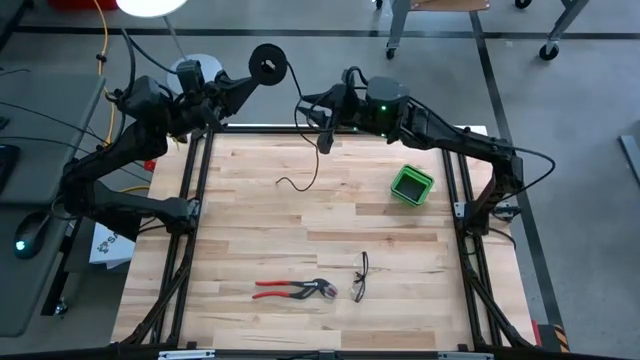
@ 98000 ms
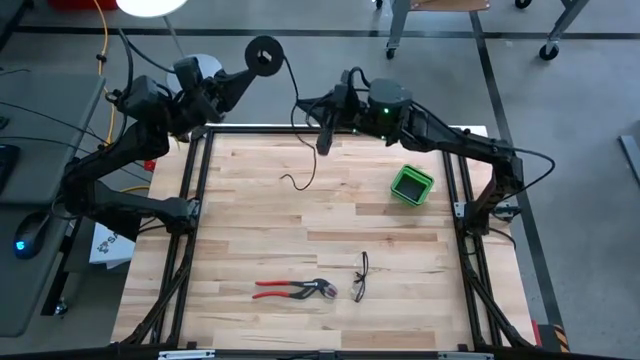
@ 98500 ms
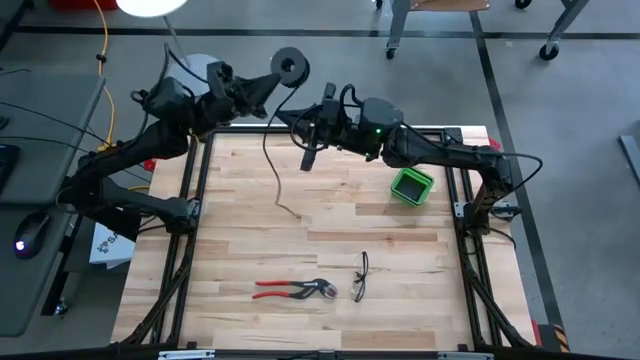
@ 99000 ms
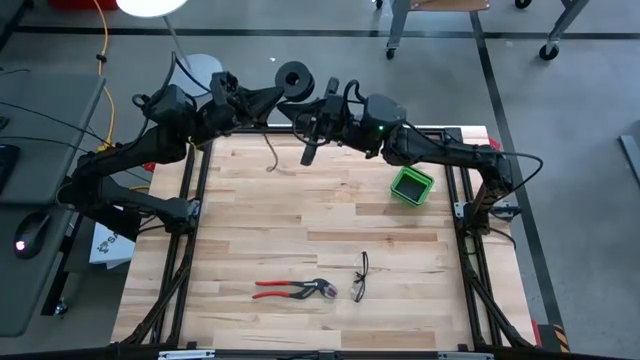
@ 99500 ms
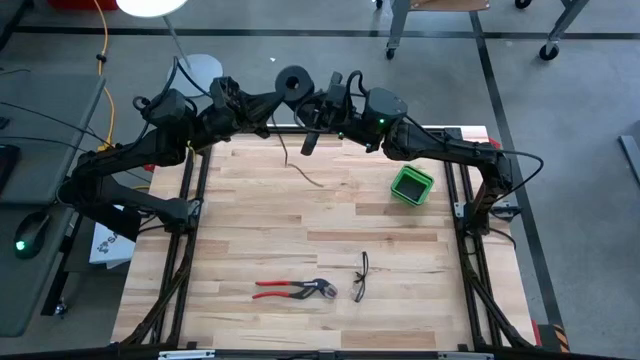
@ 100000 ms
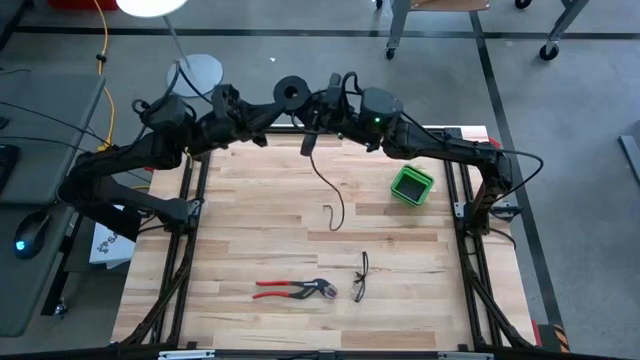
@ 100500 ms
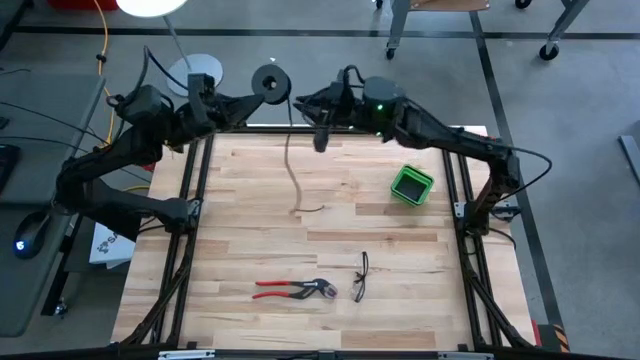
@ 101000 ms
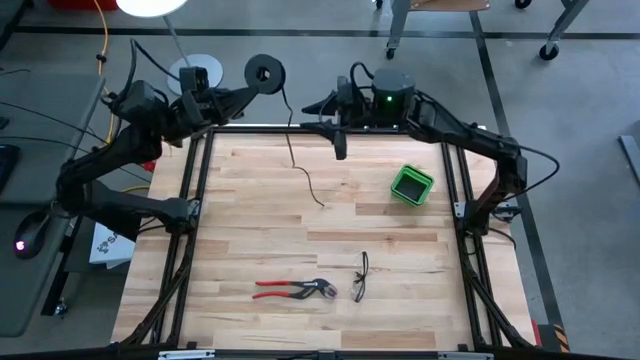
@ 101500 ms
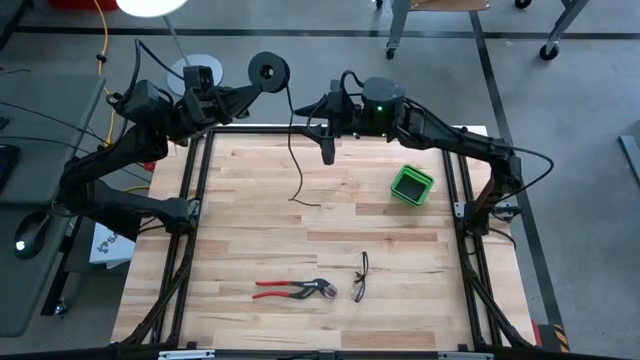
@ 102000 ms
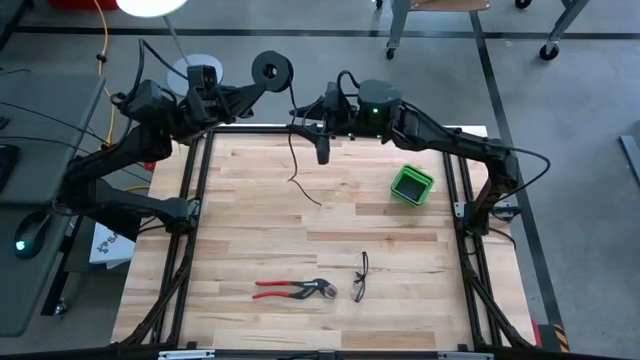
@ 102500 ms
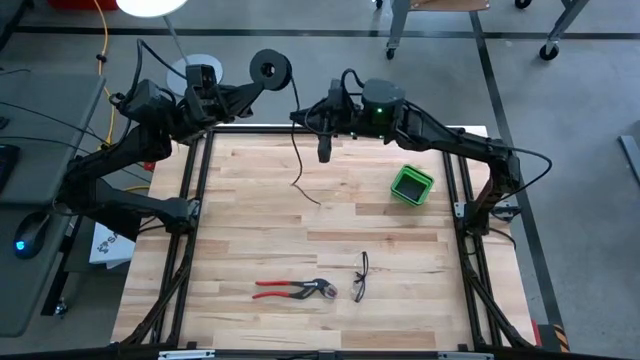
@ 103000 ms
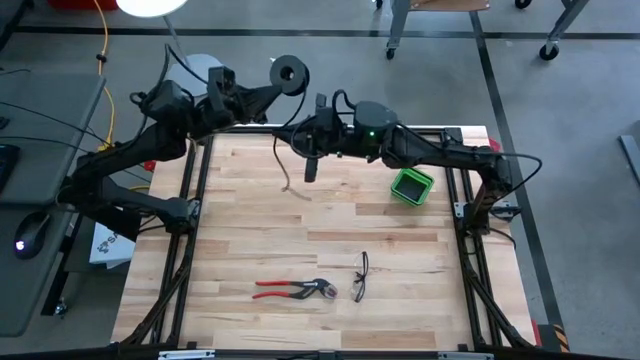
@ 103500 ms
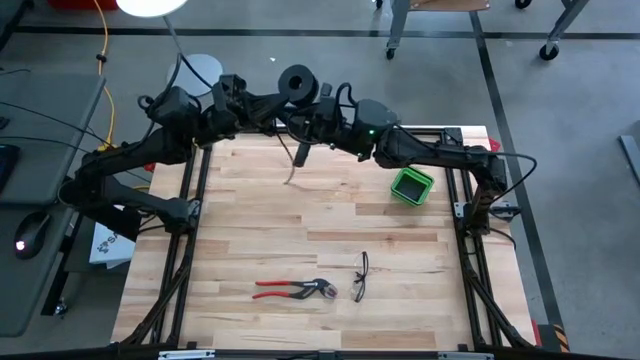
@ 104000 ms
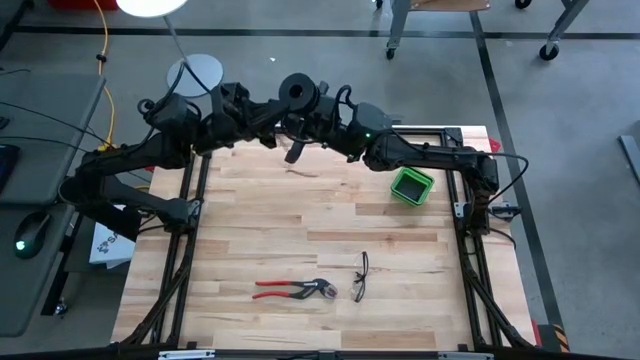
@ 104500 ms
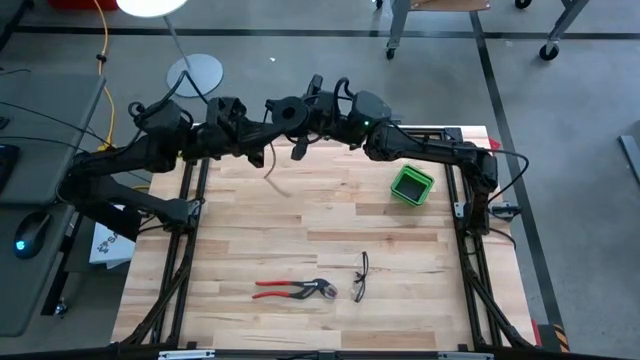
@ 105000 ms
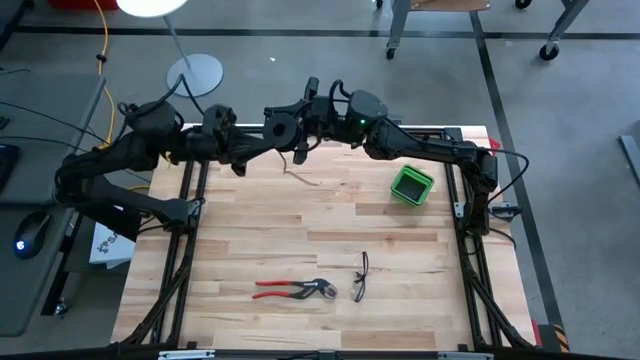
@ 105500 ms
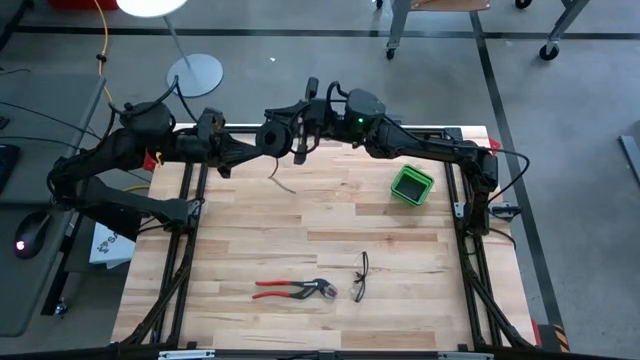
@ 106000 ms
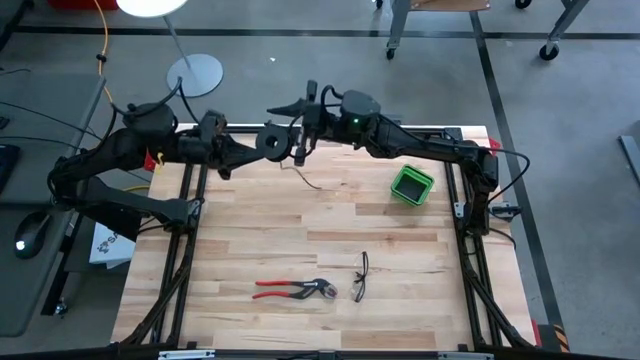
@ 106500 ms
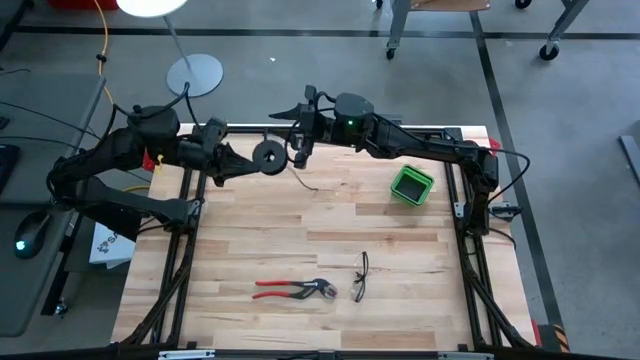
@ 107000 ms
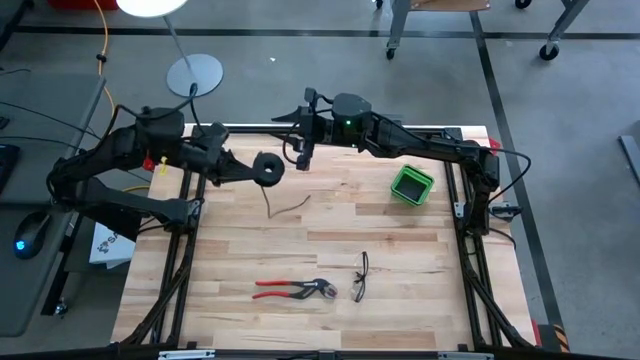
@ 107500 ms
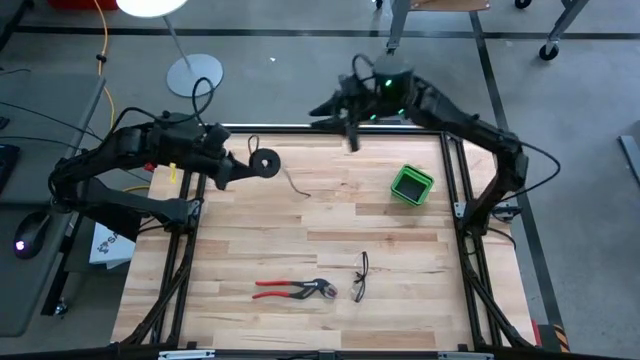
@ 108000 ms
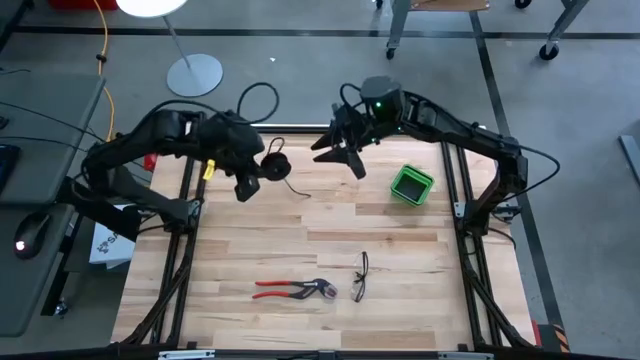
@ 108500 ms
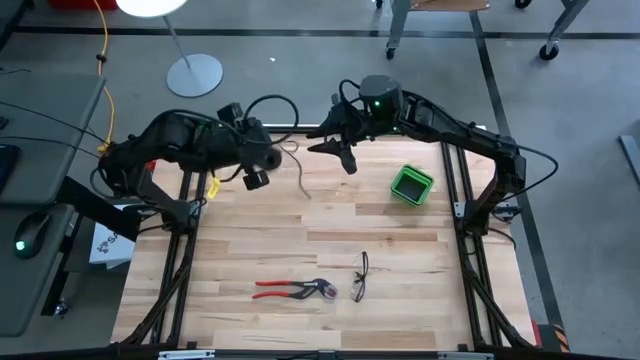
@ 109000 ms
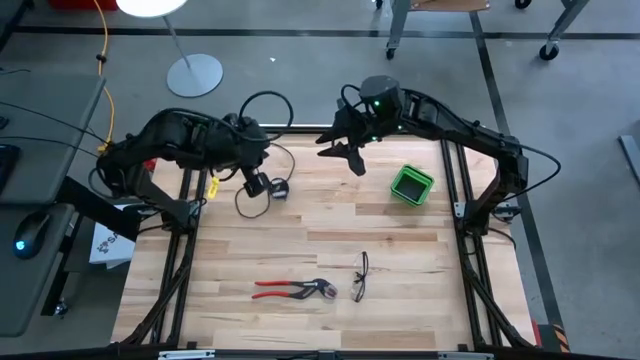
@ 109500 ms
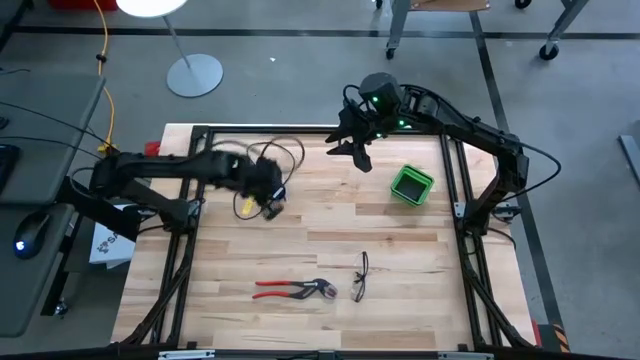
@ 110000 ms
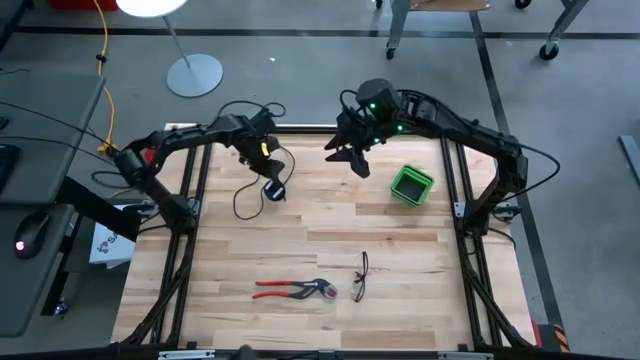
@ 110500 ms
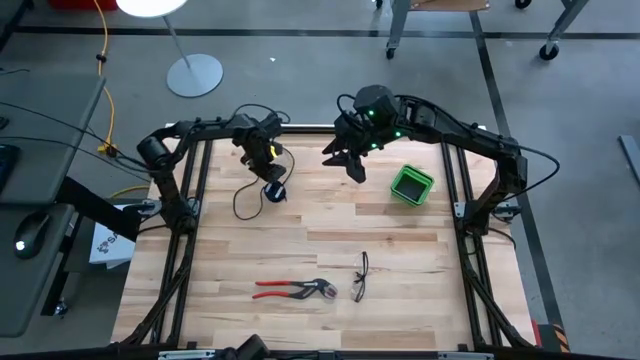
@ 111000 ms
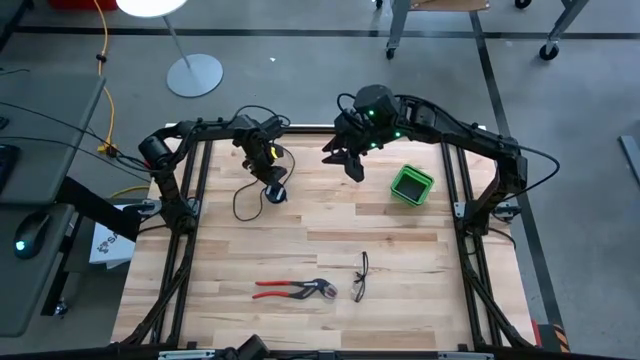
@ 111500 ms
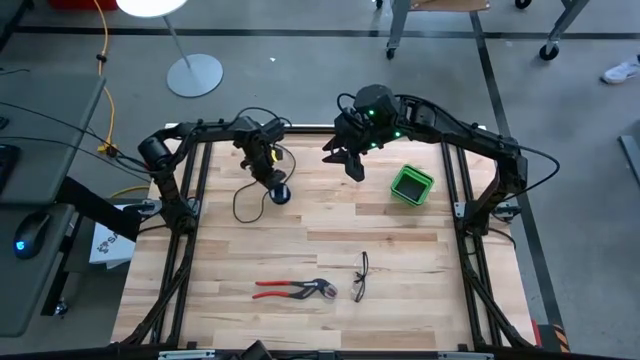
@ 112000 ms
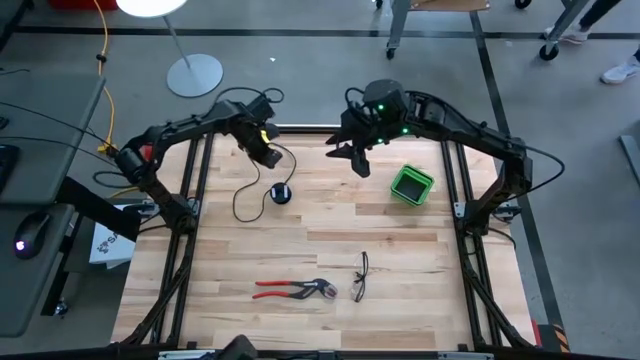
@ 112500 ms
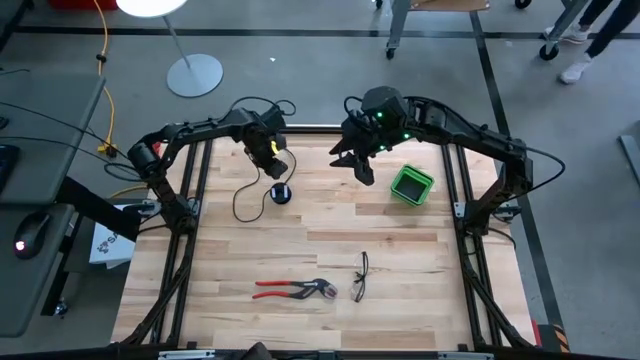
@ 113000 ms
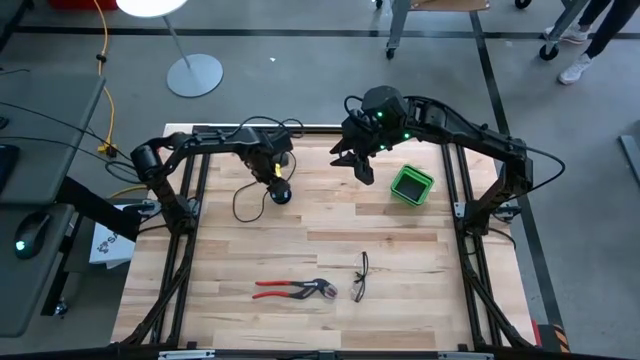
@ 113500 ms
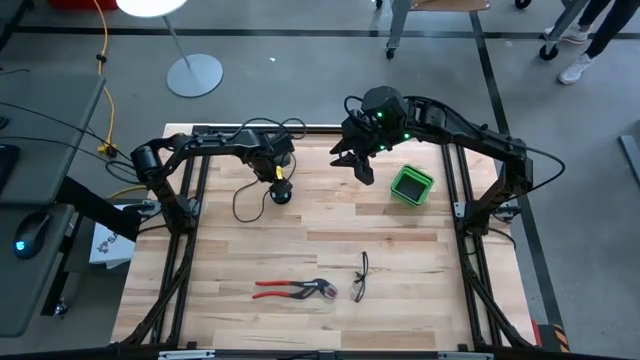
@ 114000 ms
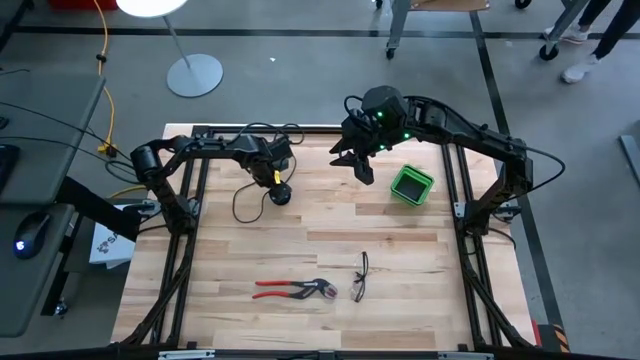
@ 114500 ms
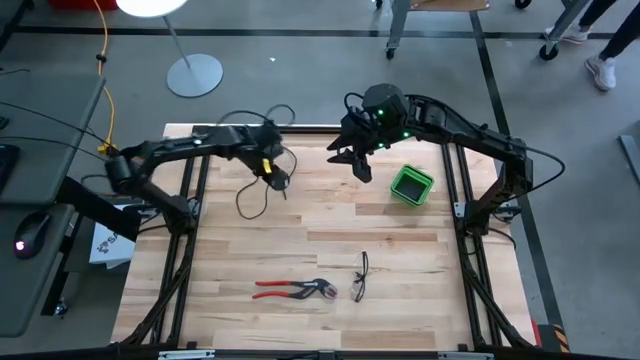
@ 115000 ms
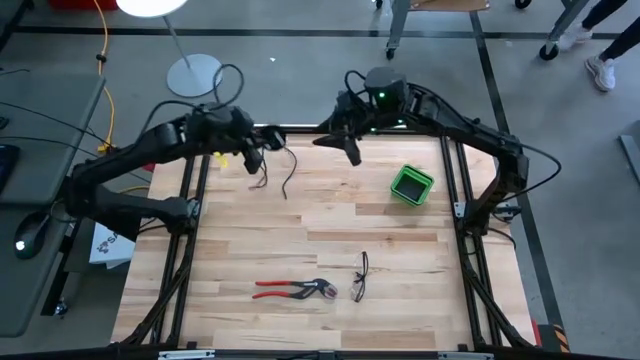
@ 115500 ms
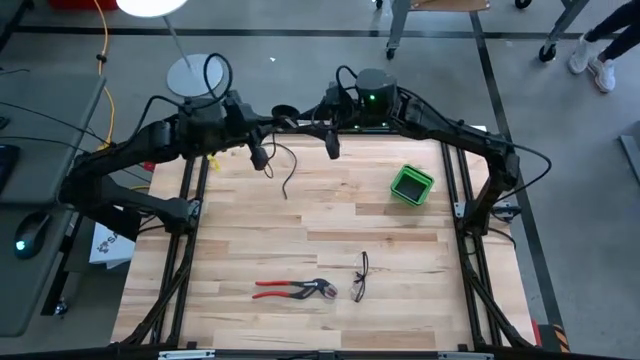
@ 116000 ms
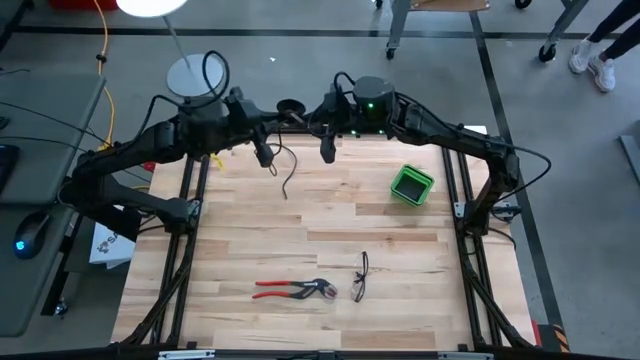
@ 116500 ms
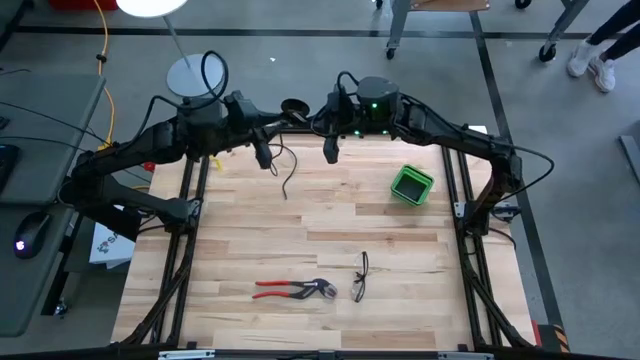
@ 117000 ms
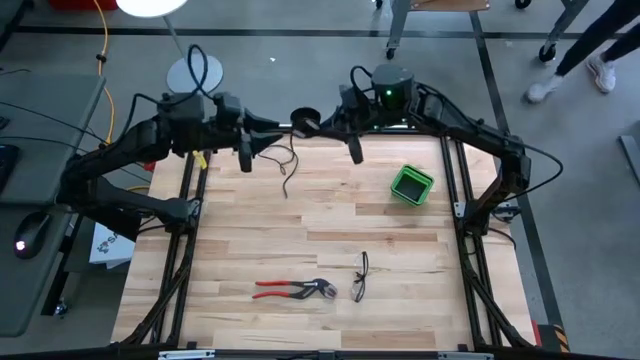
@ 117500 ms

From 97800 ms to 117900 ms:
Task: Coil cords
Coil the black wire onto the black spool
